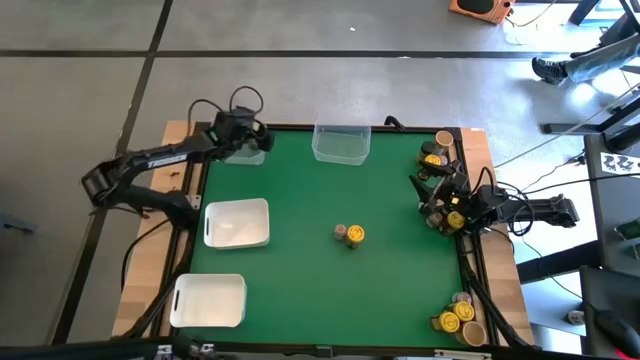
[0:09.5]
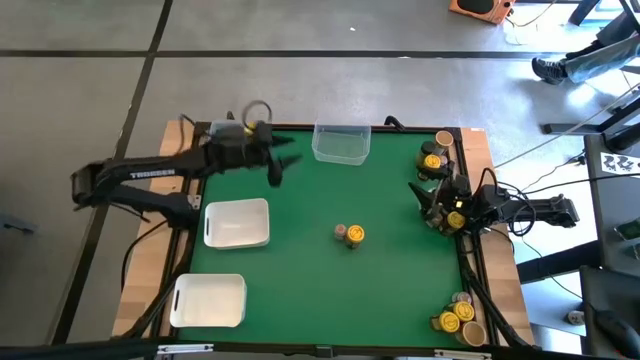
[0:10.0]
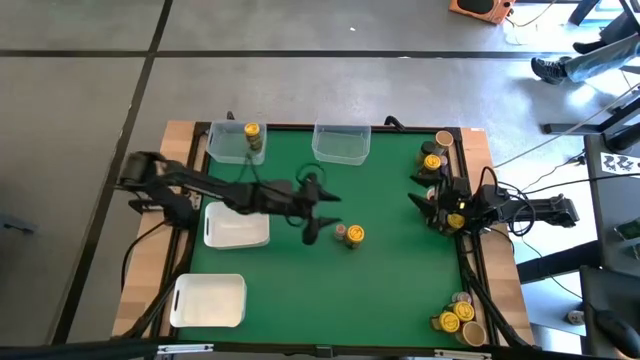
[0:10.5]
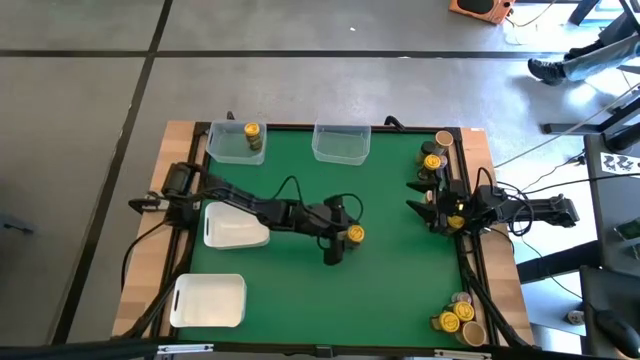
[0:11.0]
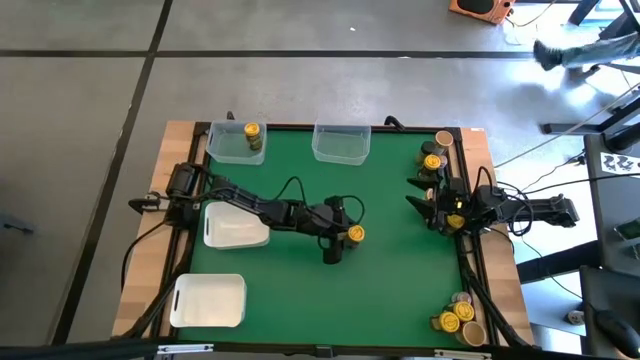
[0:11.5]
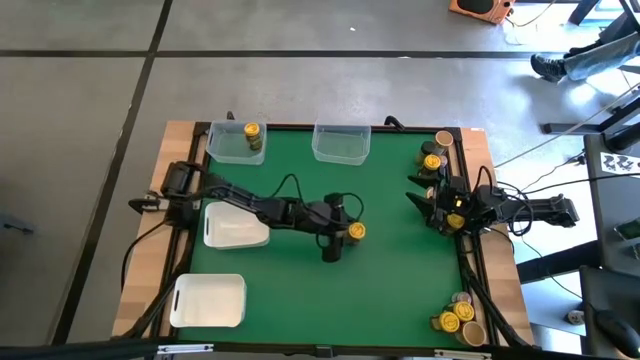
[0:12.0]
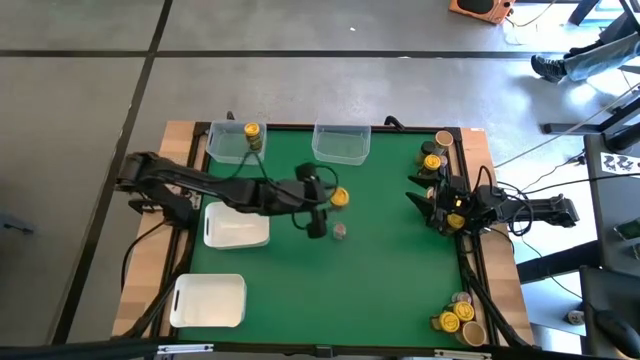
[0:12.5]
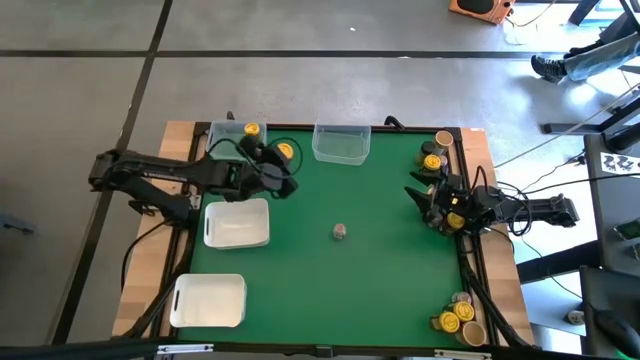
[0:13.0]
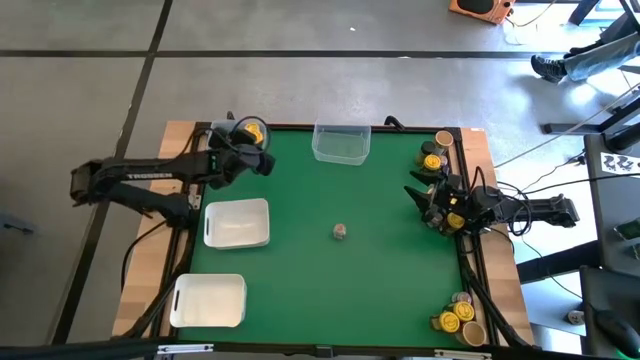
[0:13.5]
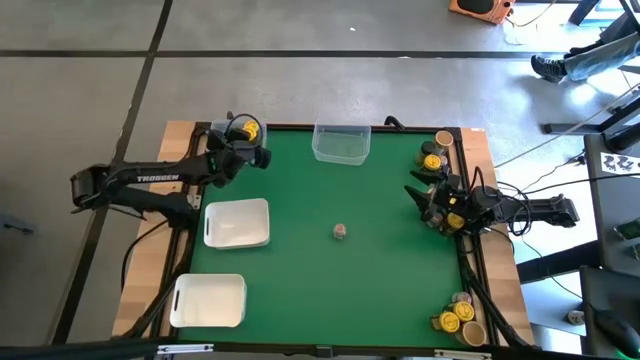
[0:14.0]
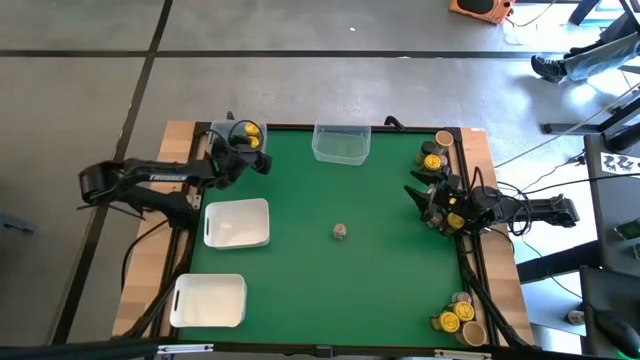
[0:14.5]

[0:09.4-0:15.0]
Task: Sort spices by type
Put the yellow seasoning bottle into the left transparent bin

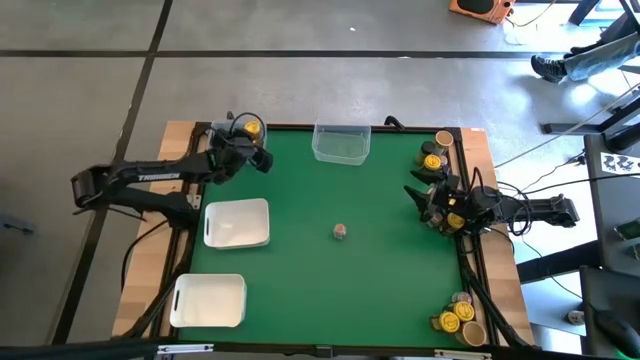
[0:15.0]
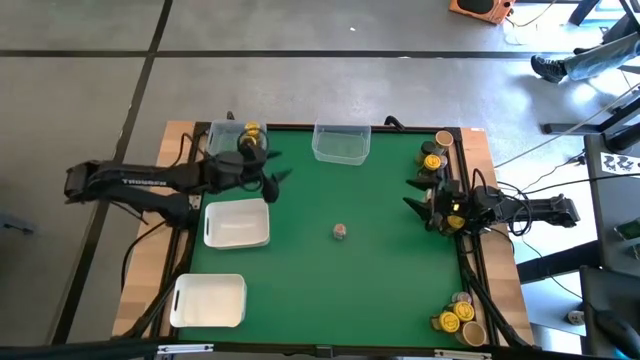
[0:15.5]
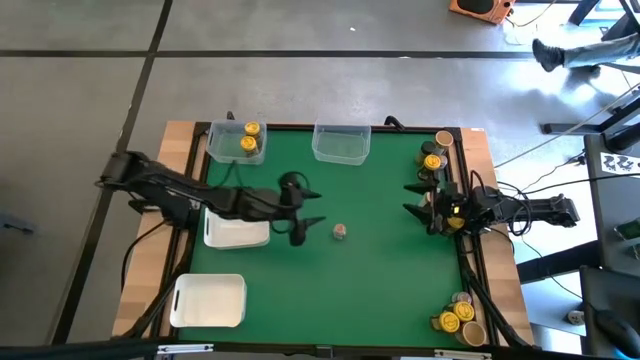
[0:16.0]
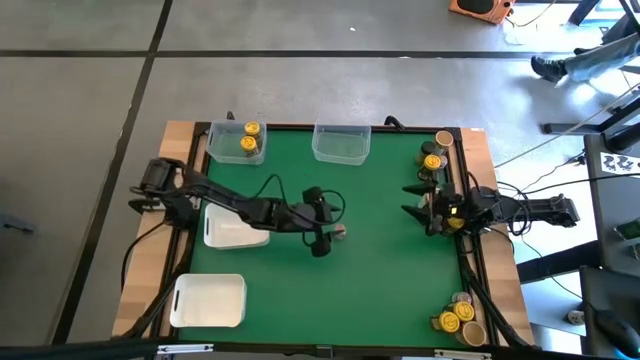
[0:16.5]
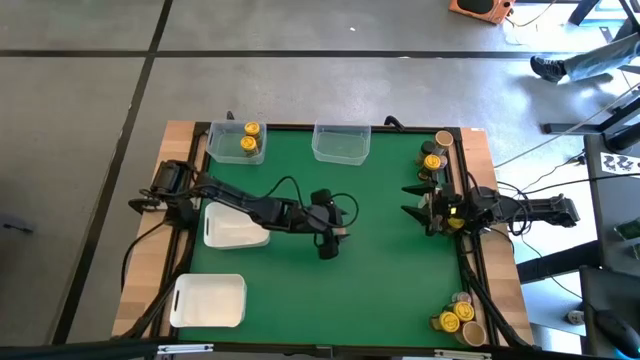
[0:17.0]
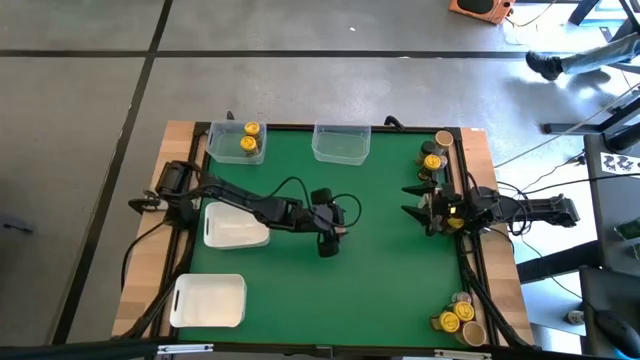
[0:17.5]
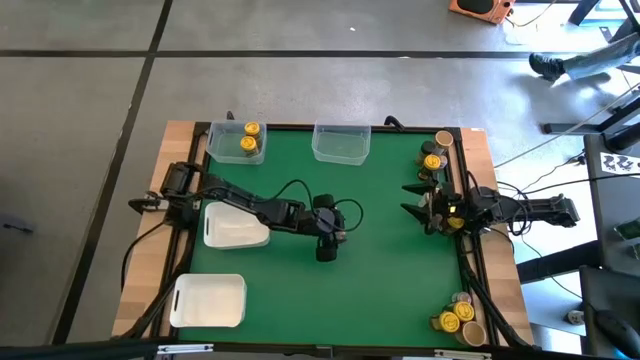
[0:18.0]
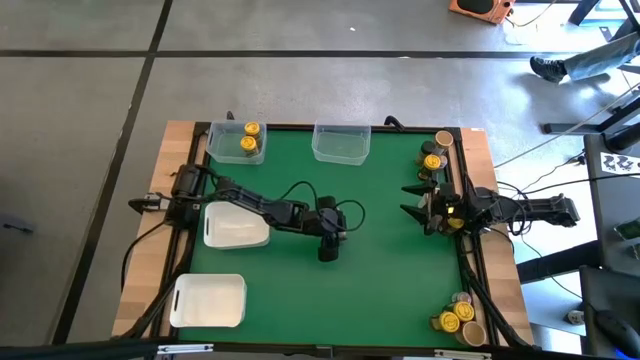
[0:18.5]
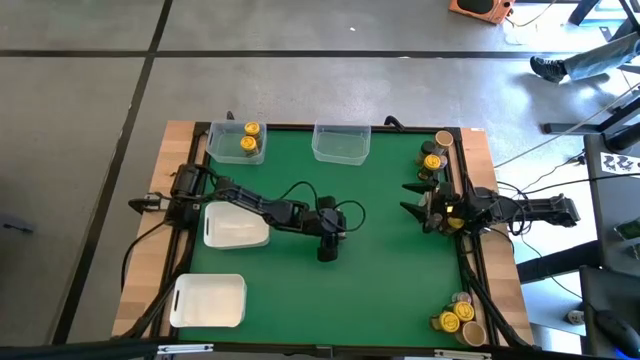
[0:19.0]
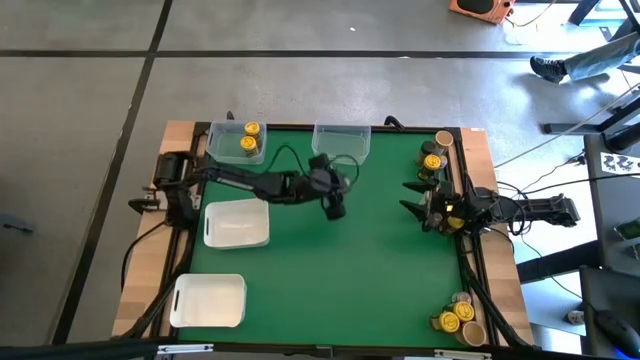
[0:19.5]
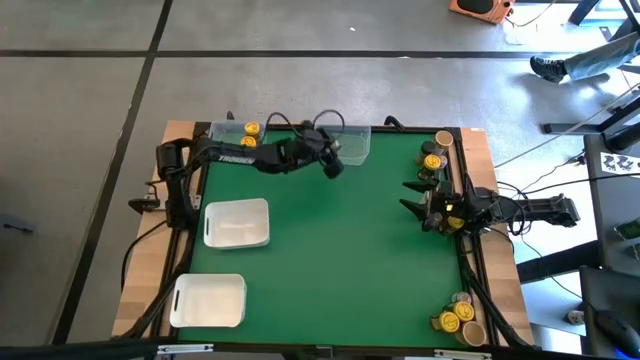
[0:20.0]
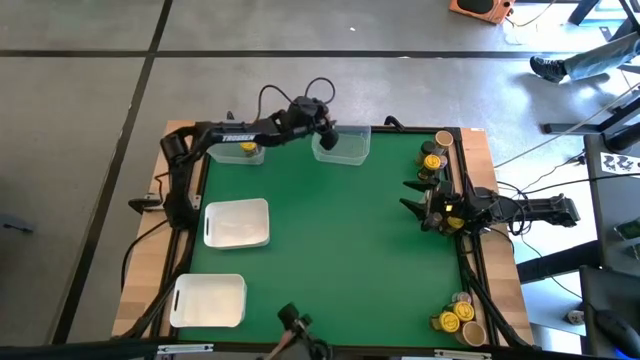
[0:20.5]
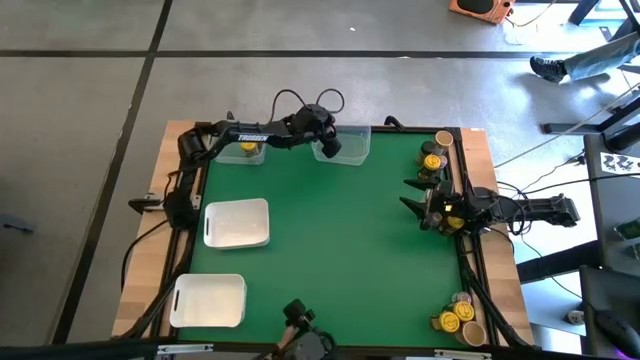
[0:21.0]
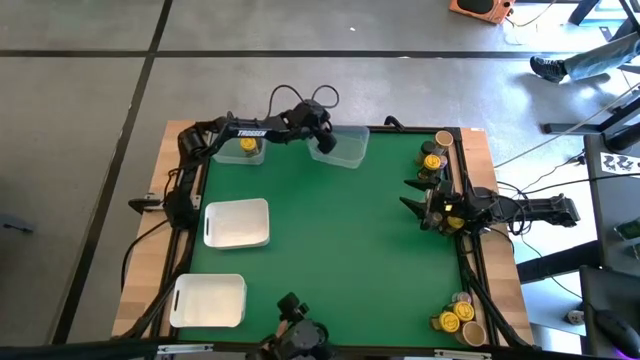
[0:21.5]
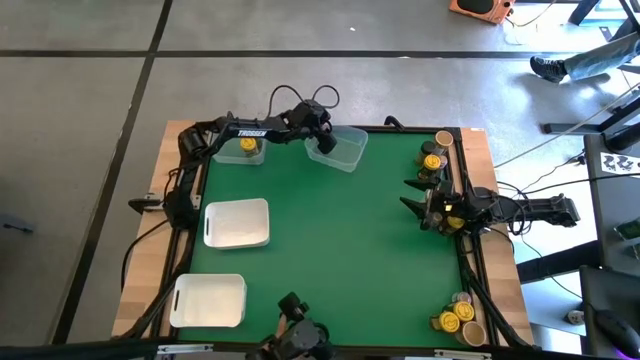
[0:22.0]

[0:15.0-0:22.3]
Put the brown seasoning bottle into the right transparent bin

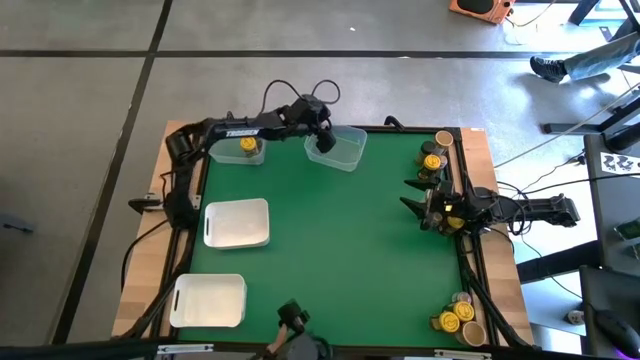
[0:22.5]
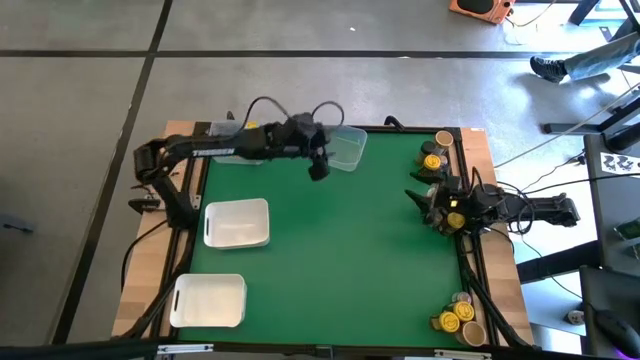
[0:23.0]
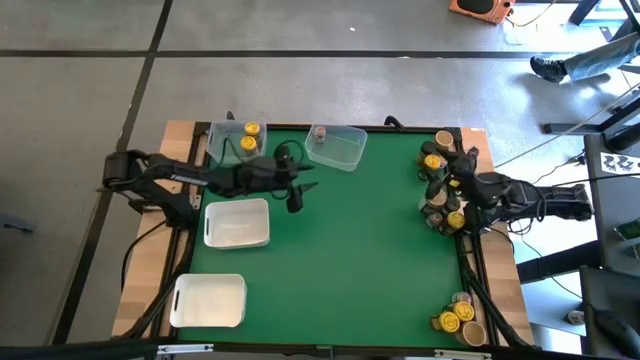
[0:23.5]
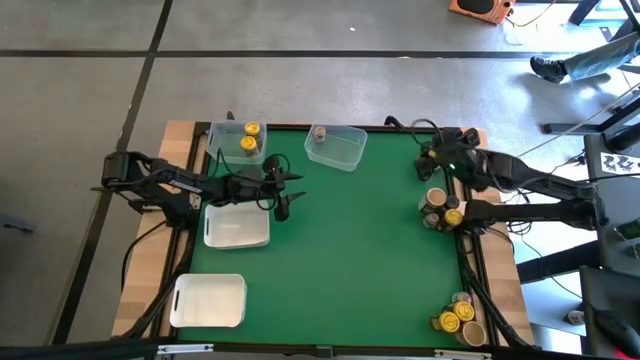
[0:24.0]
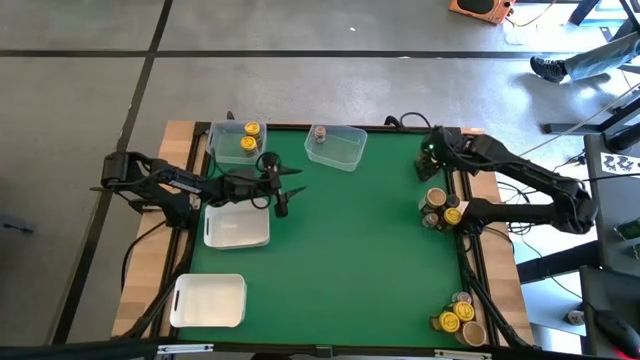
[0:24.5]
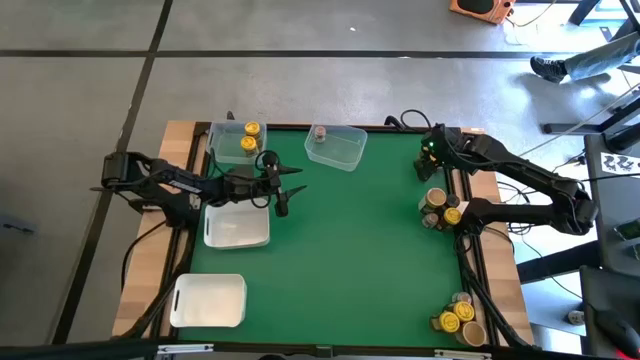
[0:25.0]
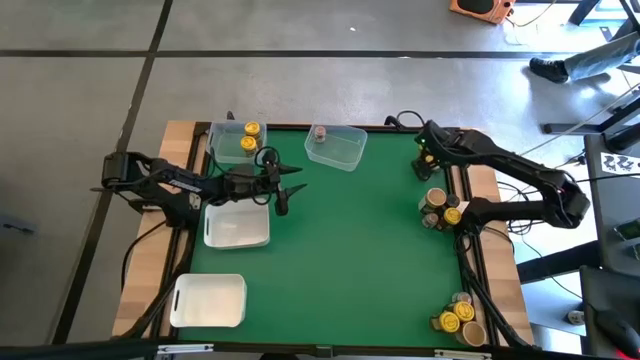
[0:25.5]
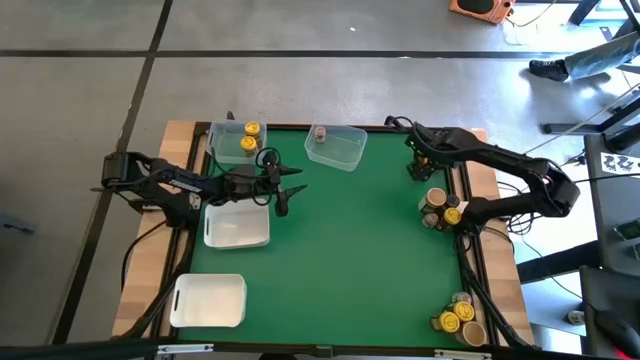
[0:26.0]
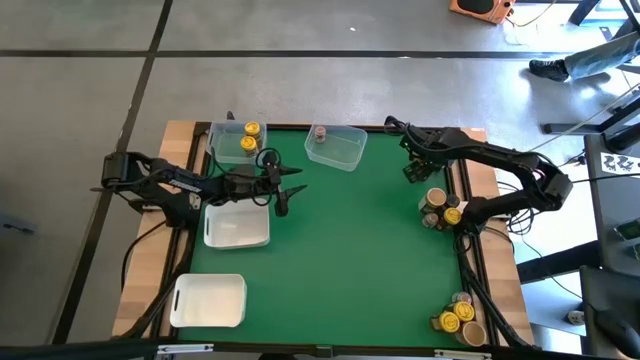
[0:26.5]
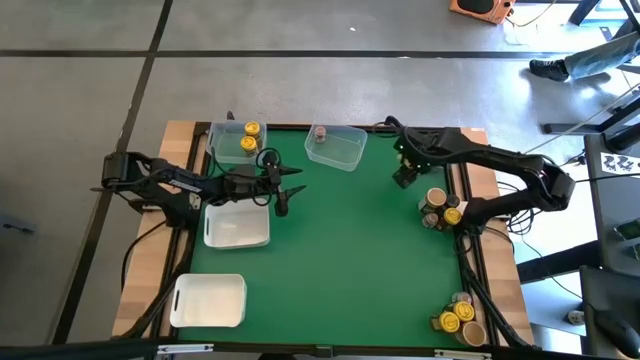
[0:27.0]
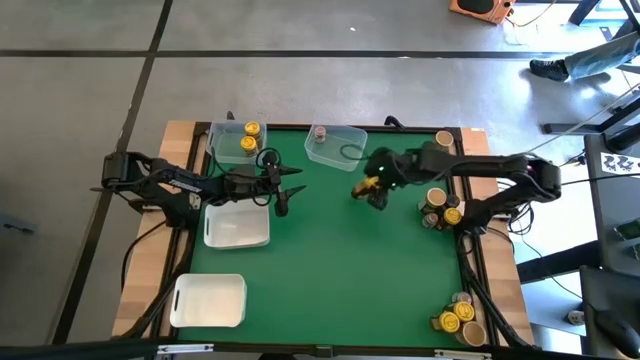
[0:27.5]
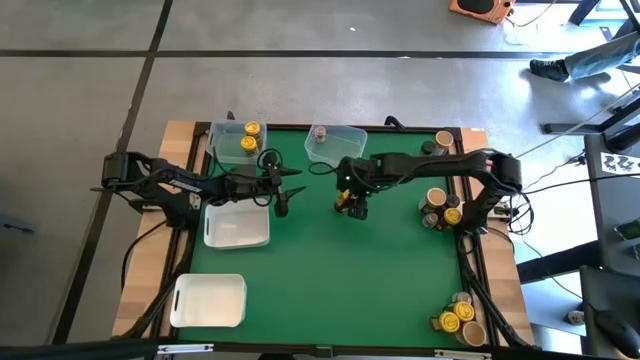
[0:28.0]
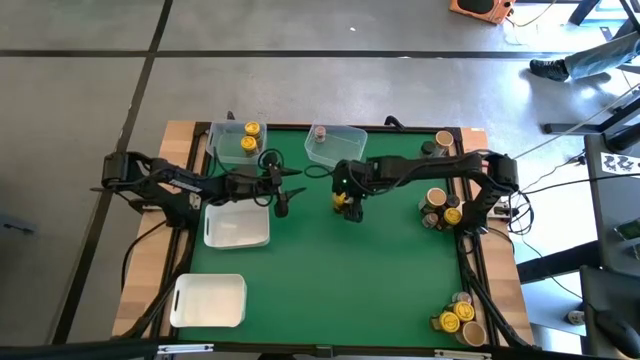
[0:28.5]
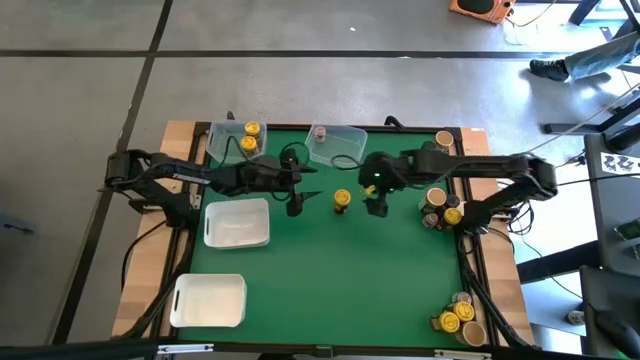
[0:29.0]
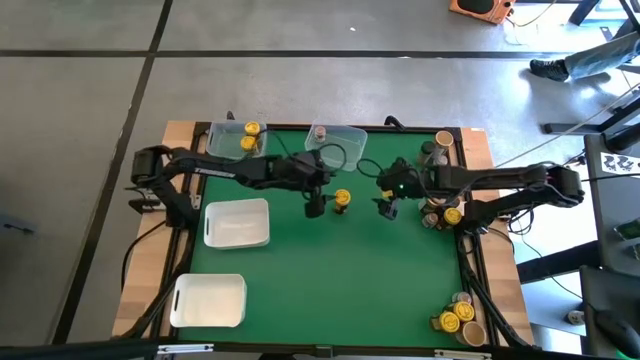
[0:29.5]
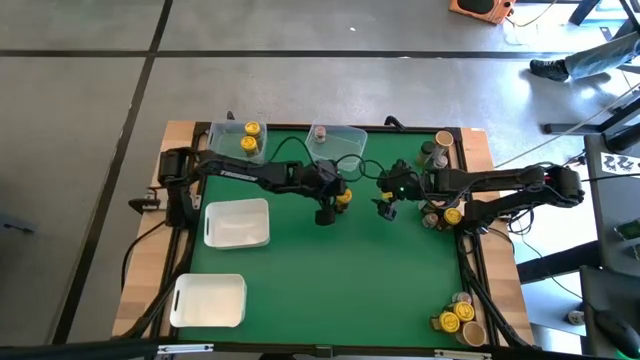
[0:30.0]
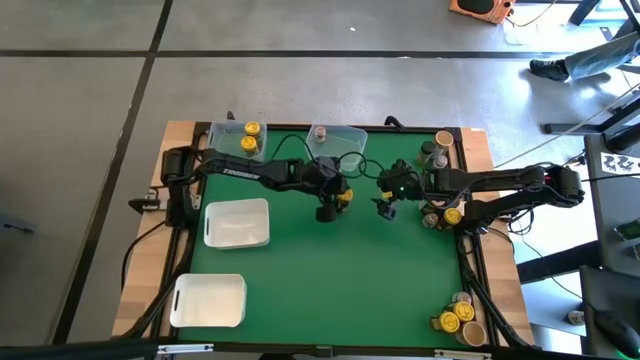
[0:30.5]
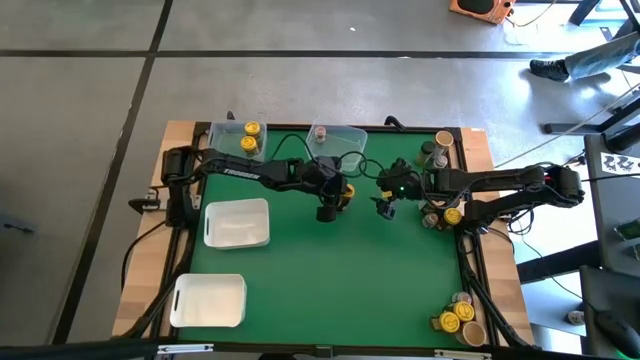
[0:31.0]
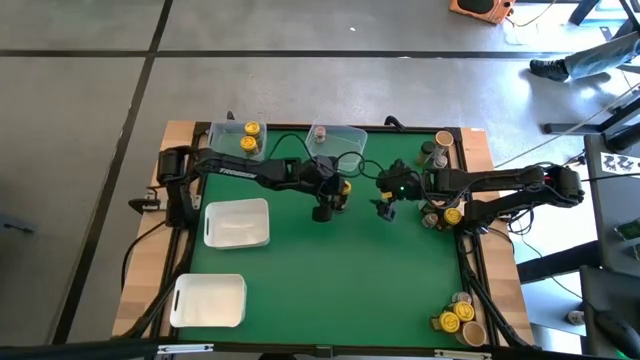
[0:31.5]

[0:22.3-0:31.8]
Put the yellow seasoning bottle into the left transparent bin
